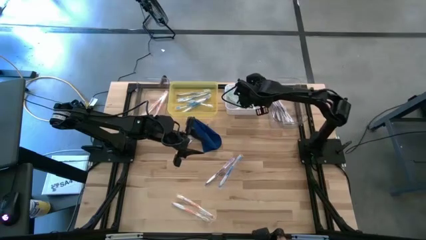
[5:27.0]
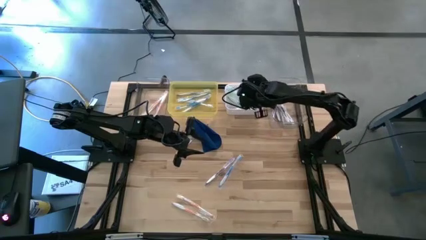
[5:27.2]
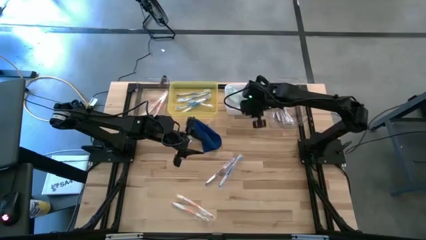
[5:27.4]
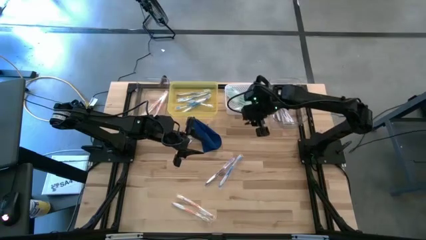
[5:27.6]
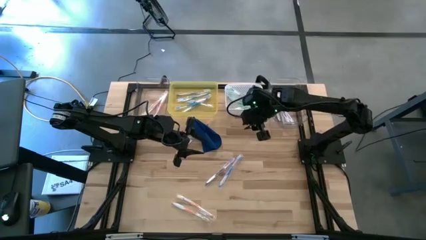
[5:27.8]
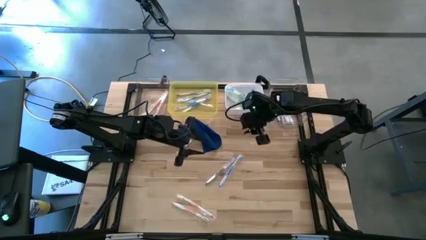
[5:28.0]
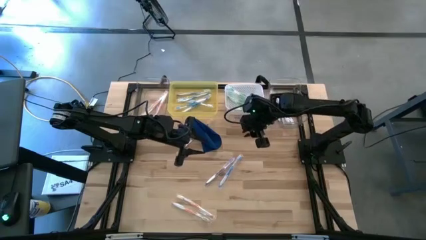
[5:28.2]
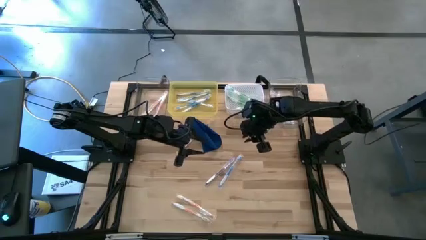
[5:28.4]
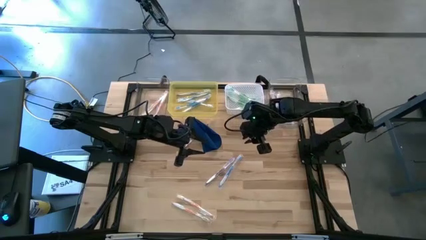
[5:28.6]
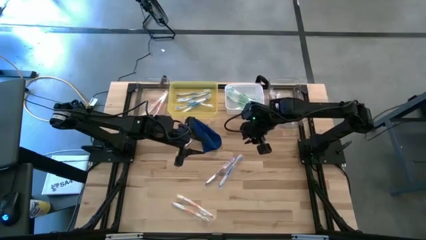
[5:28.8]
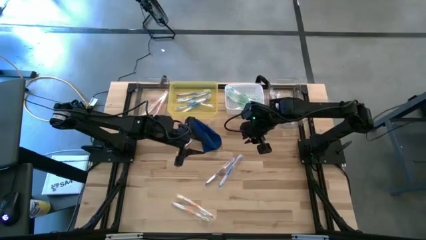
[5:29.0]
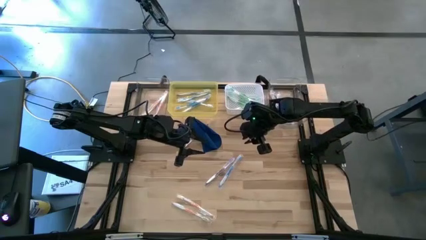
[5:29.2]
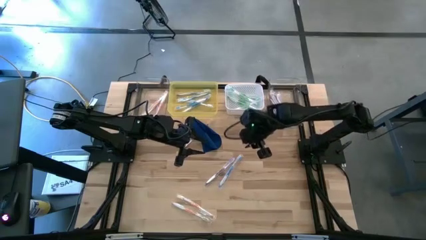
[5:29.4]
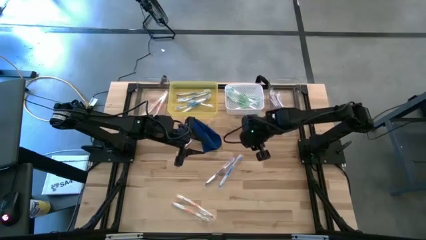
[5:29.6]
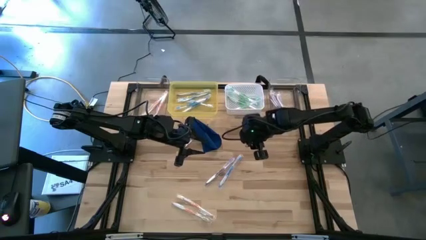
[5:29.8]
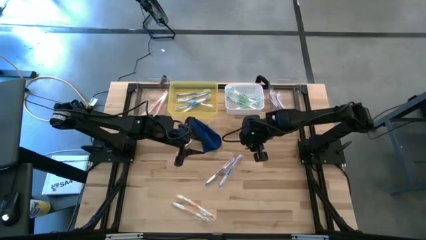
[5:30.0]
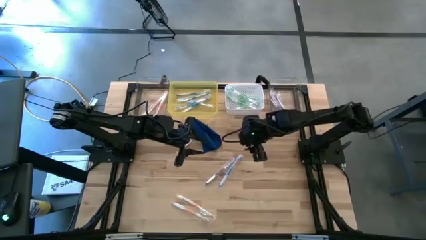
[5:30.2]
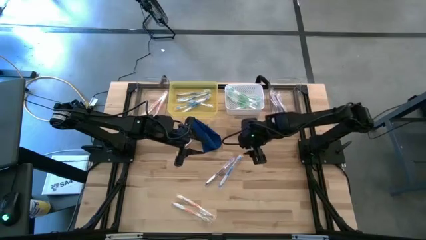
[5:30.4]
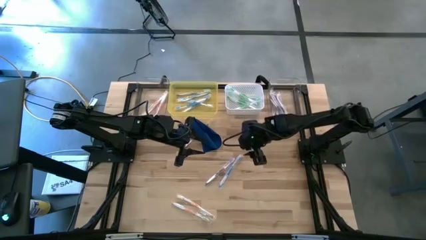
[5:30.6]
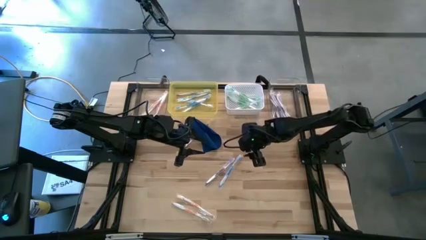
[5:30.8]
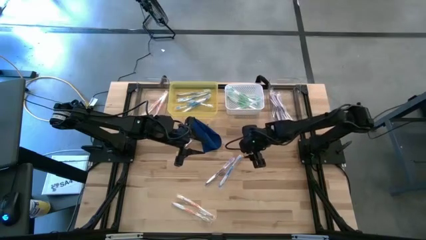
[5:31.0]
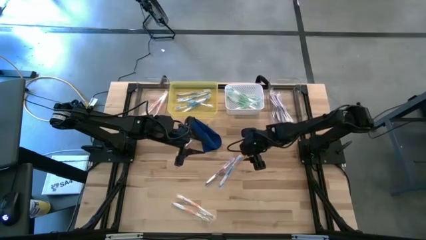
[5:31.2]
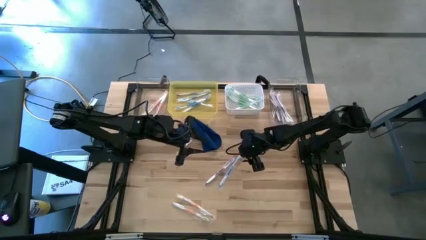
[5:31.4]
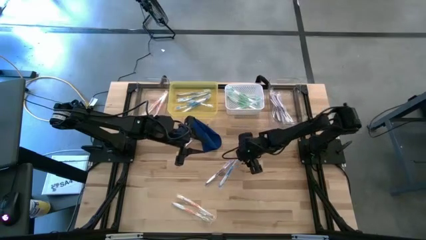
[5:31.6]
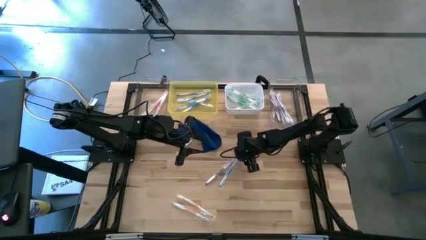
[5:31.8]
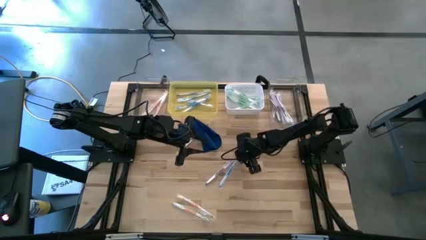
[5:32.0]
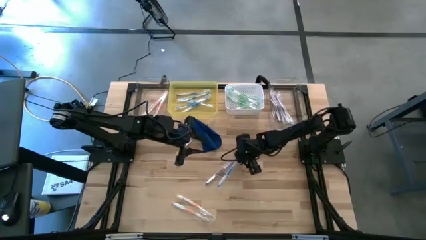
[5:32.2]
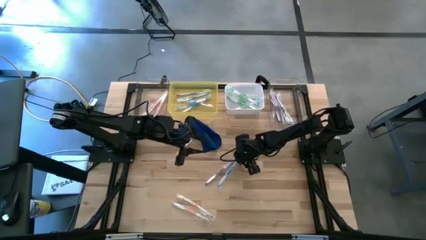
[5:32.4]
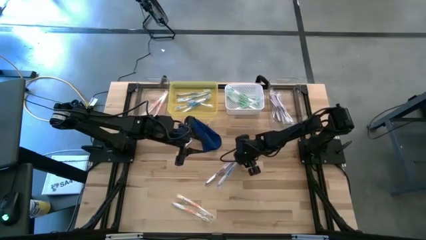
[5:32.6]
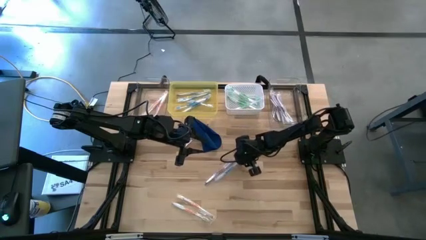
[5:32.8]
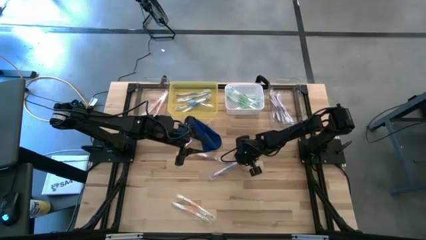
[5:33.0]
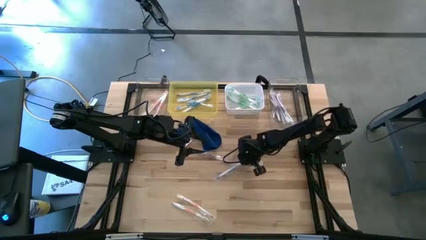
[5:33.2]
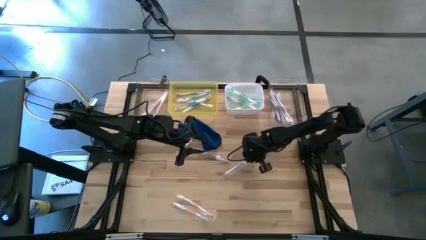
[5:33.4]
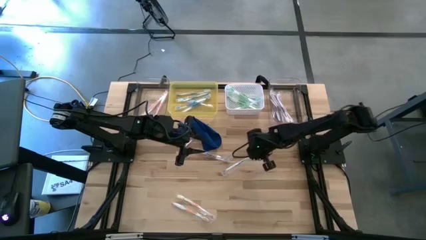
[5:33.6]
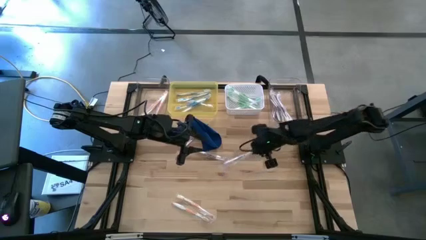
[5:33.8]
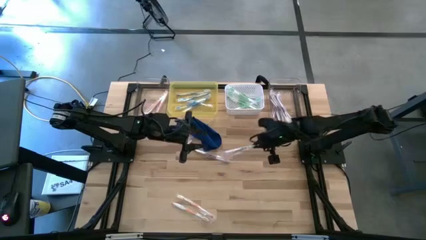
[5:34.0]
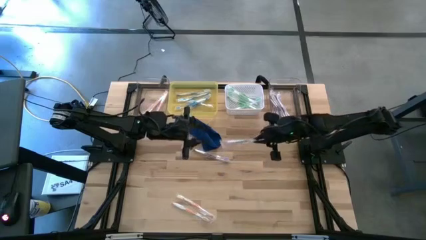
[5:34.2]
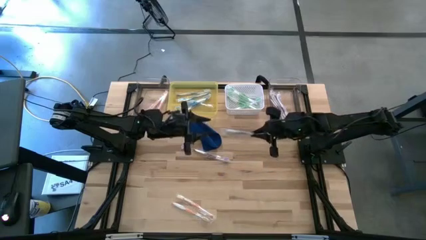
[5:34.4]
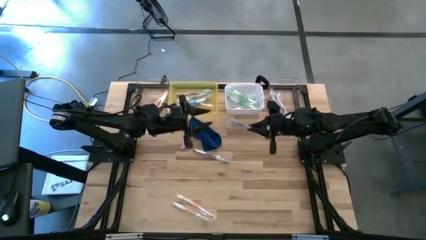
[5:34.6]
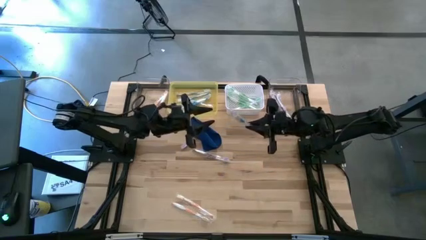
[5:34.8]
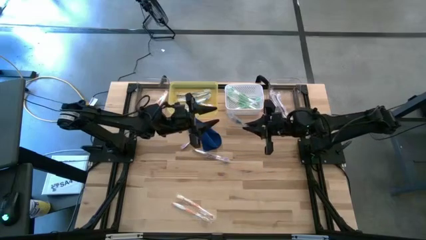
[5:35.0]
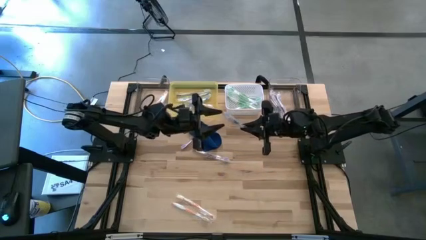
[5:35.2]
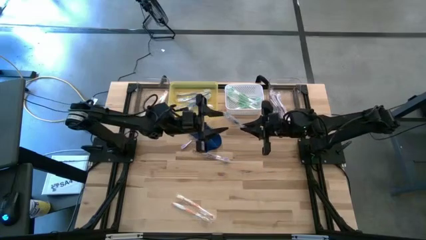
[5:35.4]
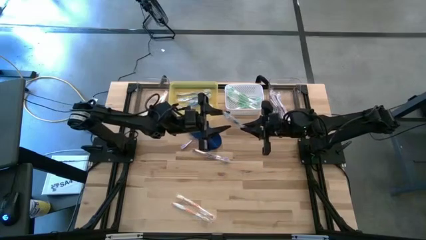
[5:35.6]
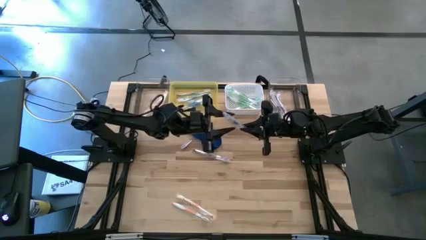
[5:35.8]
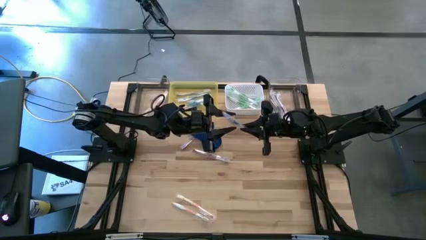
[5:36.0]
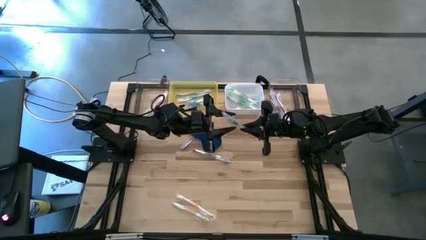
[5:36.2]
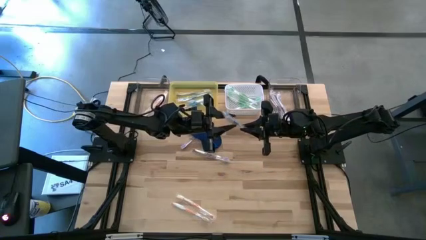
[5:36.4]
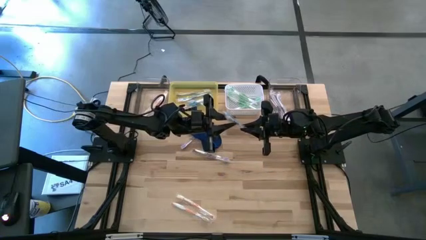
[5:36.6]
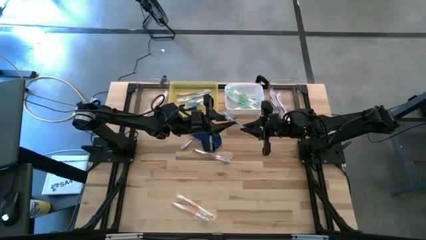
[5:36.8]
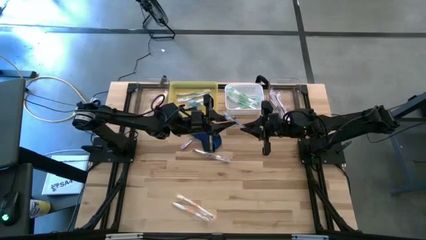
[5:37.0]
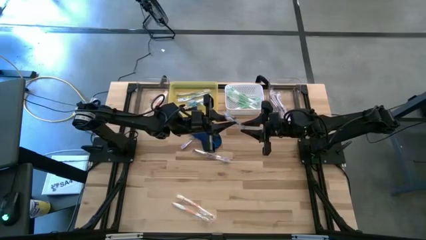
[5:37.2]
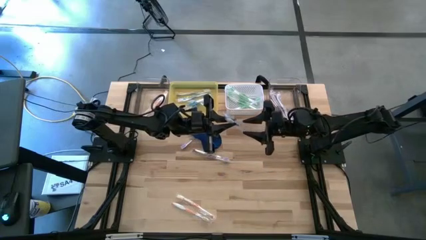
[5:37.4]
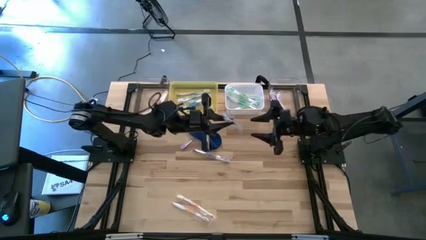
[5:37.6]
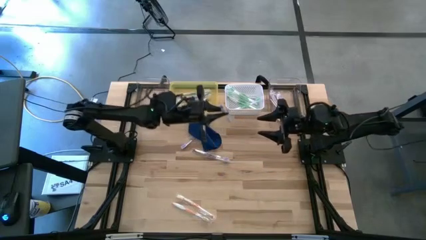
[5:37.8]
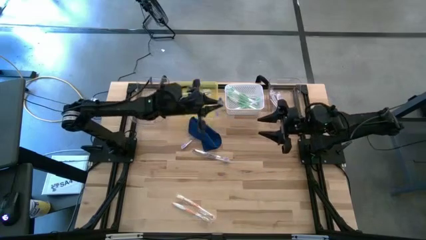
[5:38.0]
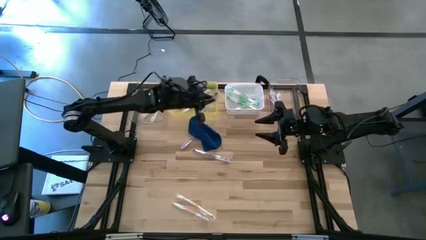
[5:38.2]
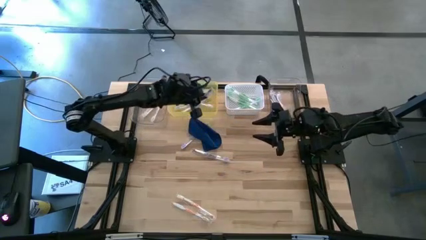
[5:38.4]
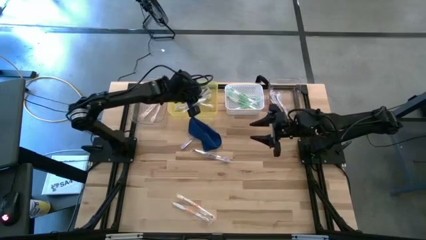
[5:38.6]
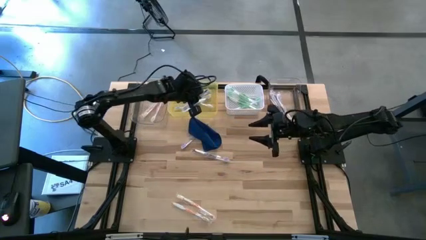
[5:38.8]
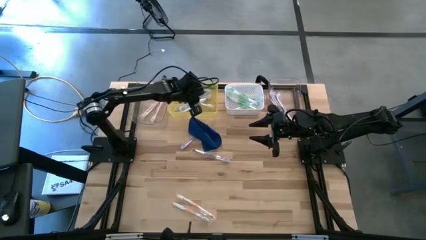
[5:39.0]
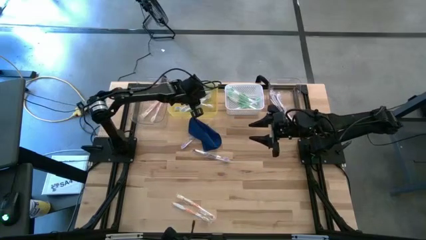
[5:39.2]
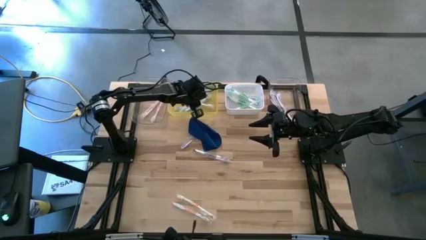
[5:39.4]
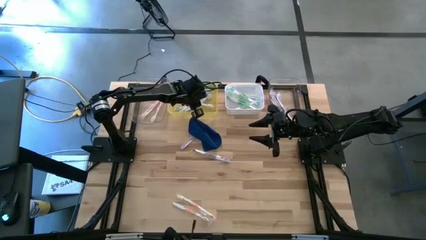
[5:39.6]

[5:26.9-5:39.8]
Task: Pick & Place Toothbrushes
Put the blue toothbrush into the yellow bin

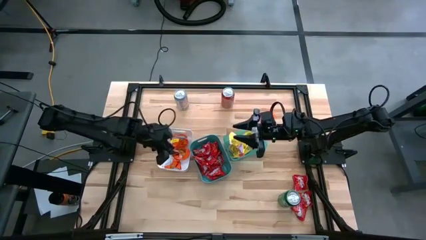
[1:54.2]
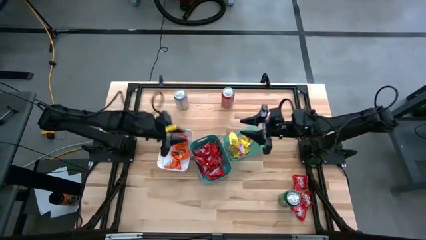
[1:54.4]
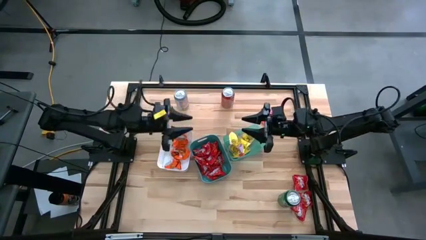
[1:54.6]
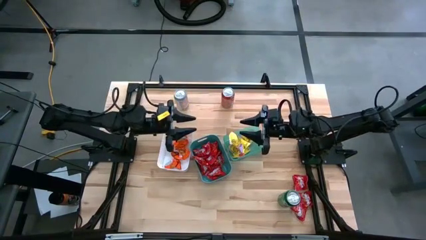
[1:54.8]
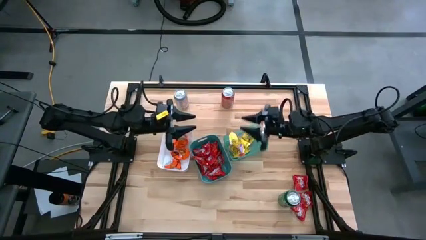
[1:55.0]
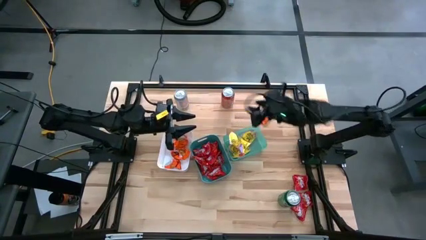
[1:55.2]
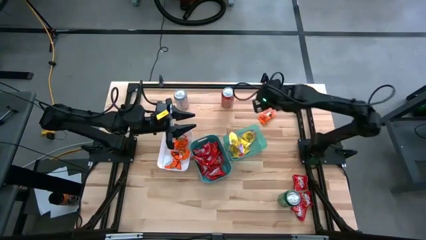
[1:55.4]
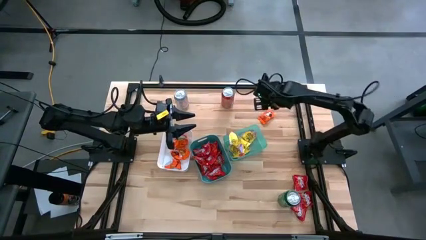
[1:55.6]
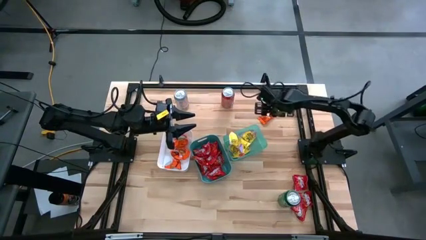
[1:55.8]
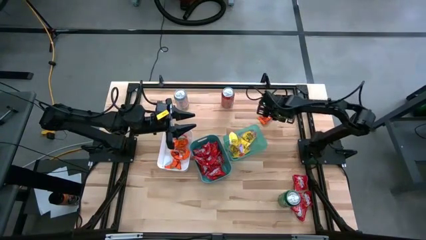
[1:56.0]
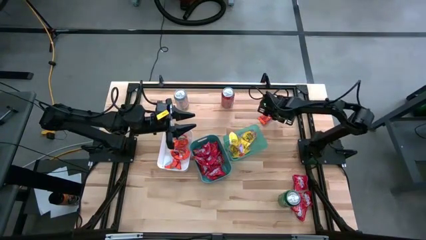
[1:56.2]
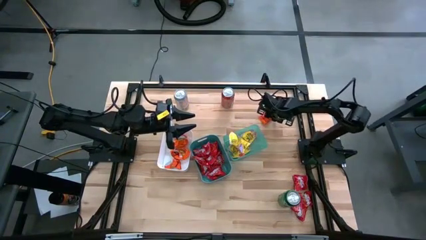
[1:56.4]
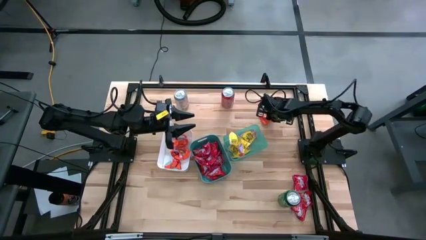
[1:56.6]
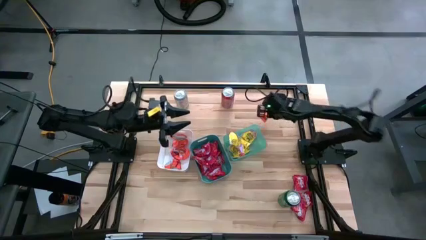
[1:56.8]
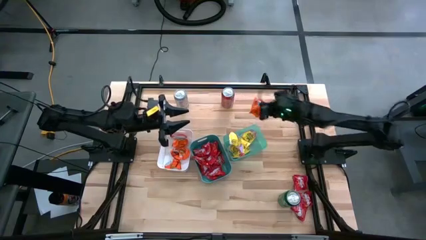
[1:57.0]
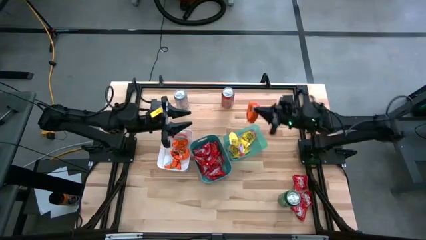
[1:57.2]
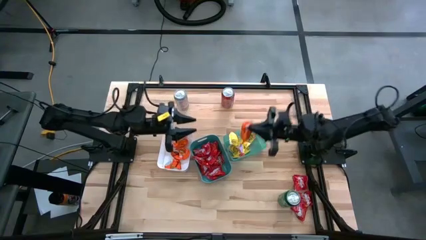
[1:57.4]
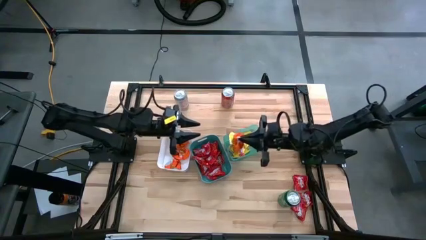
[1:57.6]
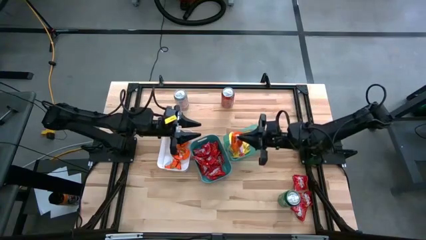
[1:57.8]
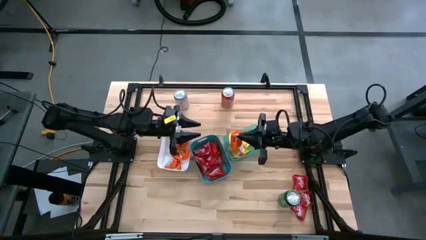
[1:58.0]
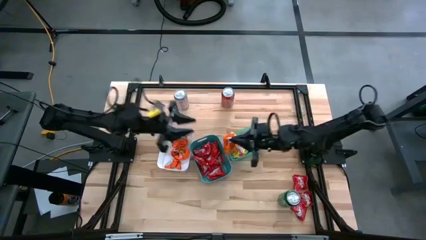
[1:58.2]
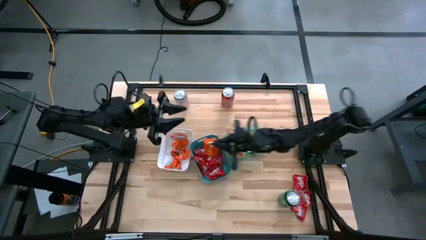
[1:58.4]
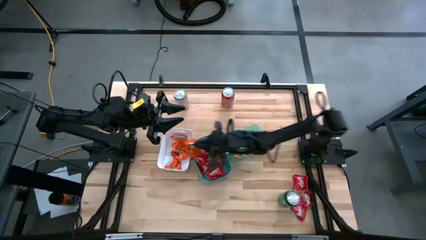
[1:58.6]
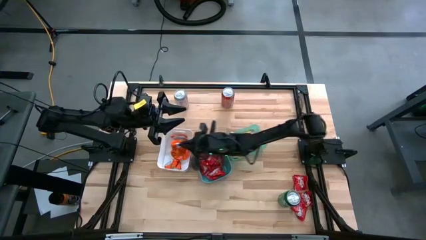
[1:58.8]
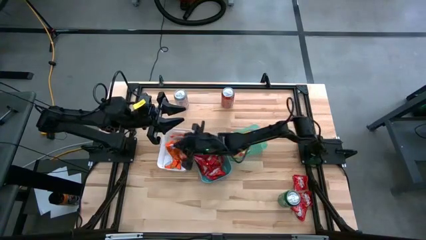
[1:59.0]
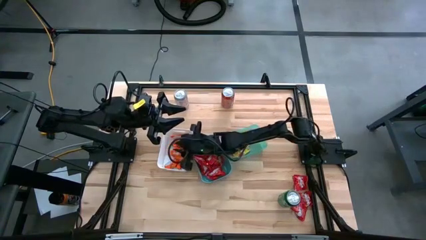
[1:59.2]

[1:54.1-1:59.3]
Task: Sort candy
Put the orange chocolate into the white bin
